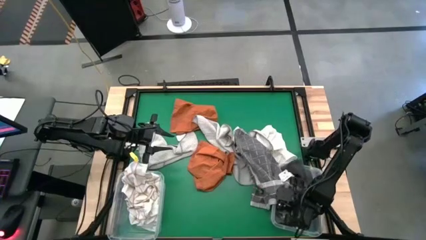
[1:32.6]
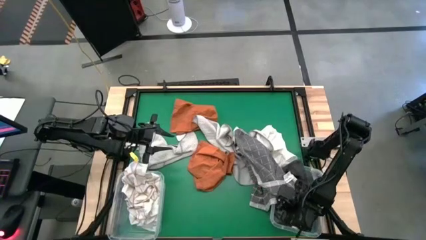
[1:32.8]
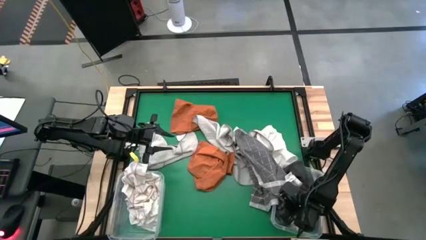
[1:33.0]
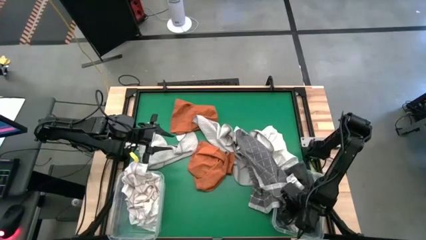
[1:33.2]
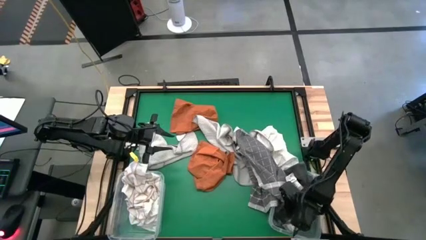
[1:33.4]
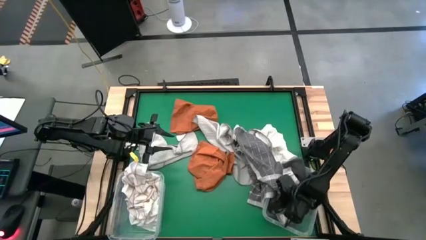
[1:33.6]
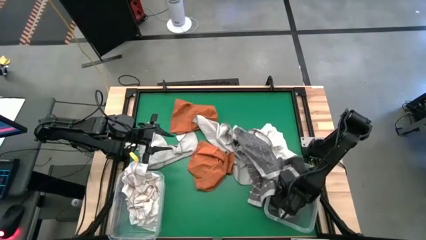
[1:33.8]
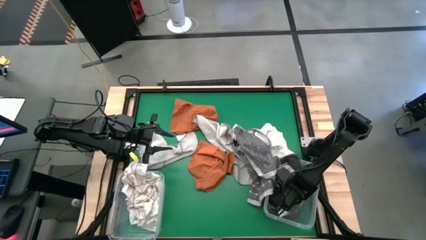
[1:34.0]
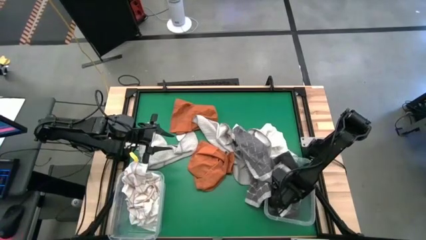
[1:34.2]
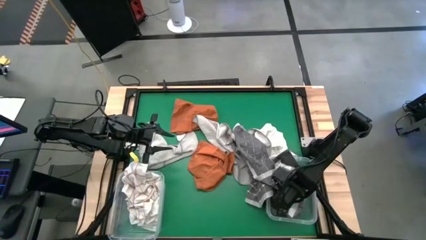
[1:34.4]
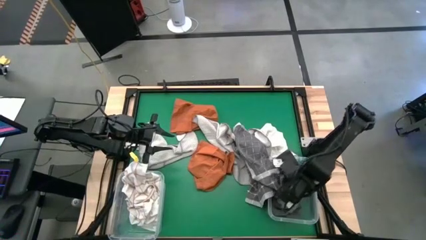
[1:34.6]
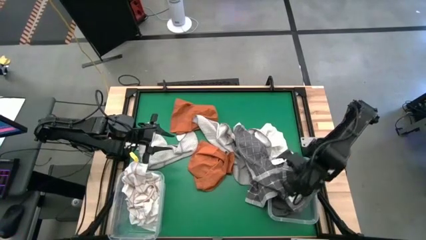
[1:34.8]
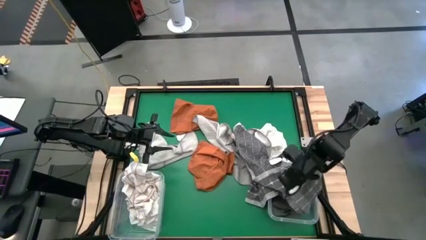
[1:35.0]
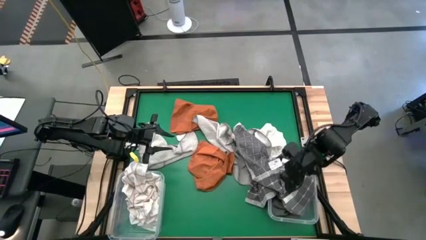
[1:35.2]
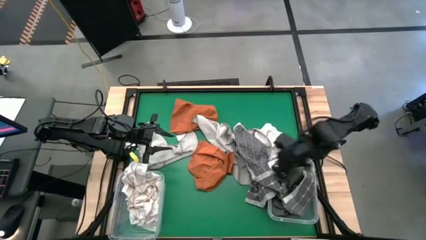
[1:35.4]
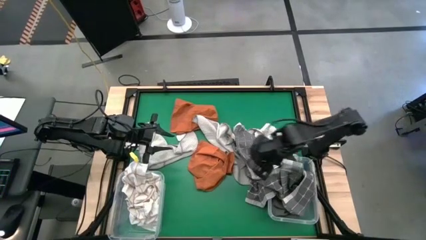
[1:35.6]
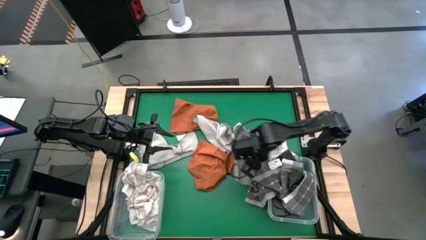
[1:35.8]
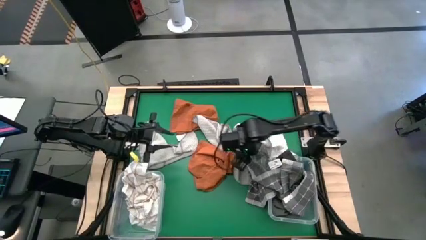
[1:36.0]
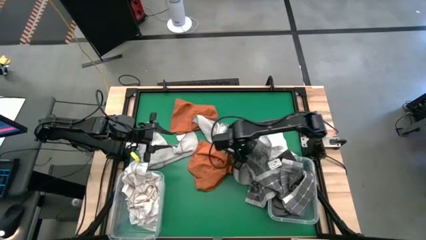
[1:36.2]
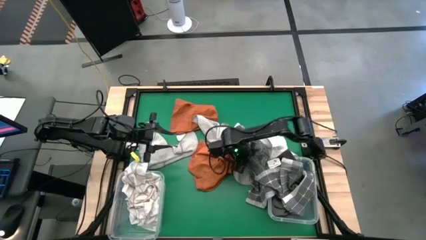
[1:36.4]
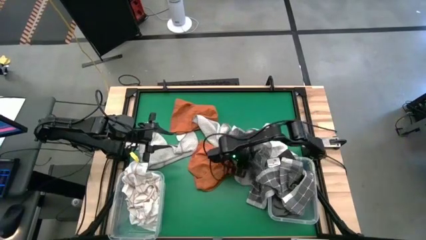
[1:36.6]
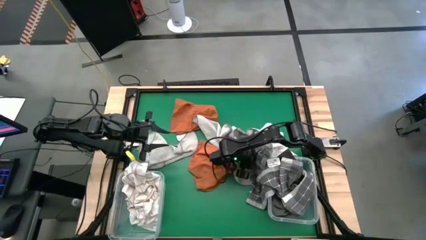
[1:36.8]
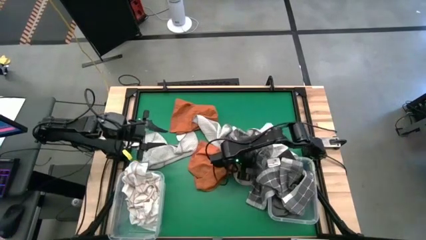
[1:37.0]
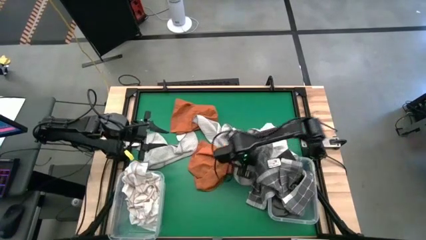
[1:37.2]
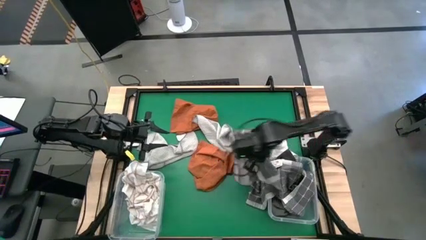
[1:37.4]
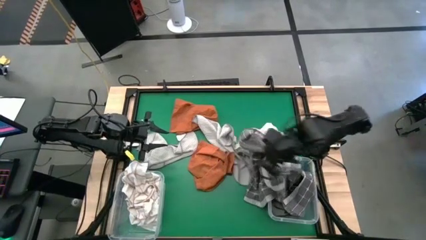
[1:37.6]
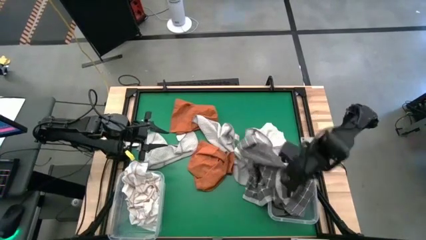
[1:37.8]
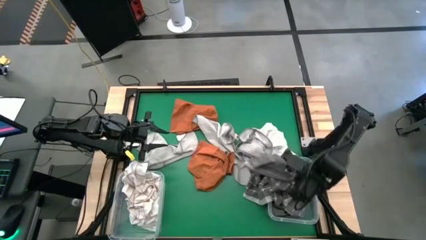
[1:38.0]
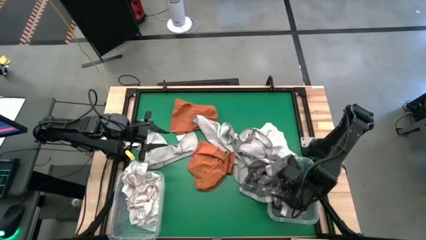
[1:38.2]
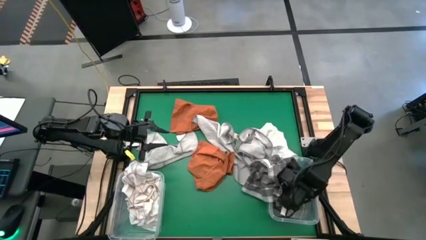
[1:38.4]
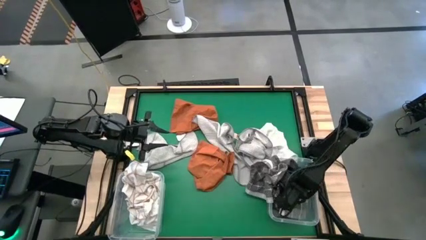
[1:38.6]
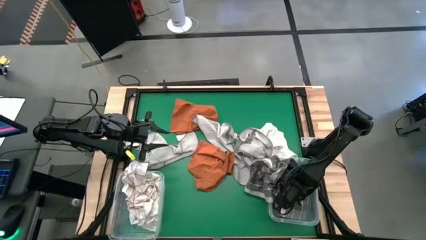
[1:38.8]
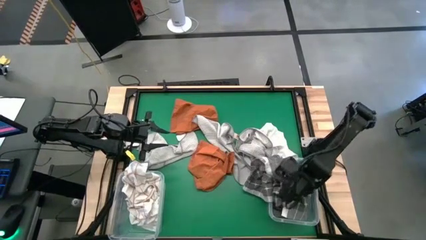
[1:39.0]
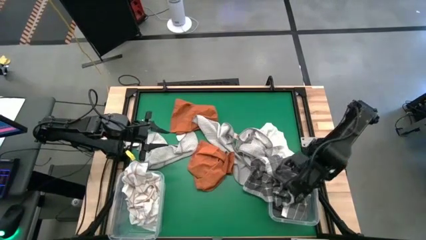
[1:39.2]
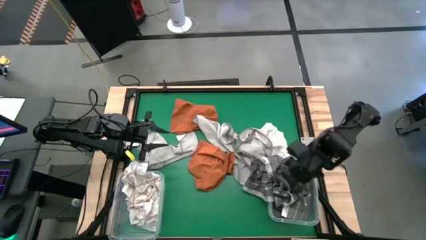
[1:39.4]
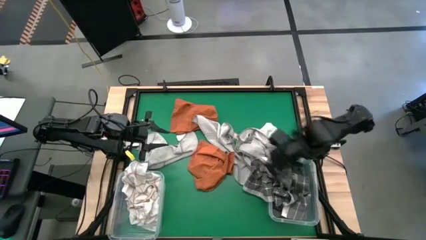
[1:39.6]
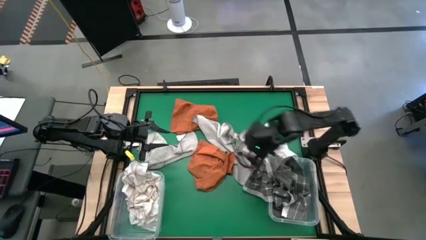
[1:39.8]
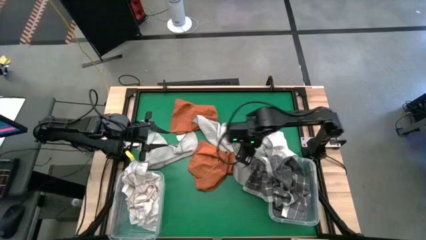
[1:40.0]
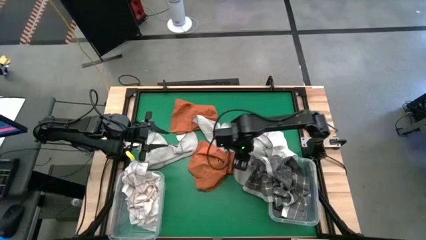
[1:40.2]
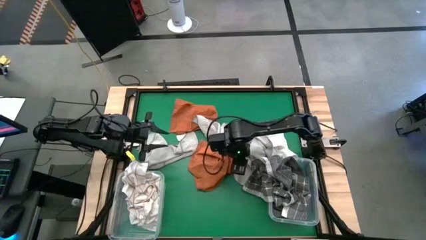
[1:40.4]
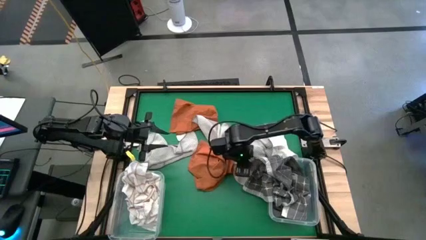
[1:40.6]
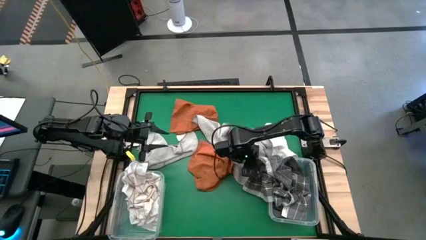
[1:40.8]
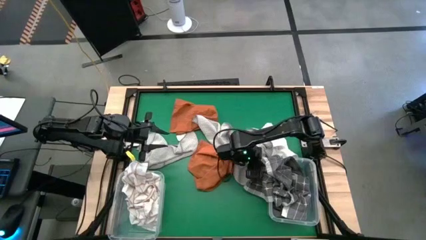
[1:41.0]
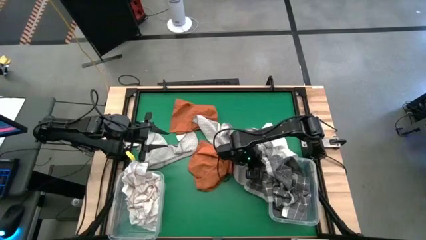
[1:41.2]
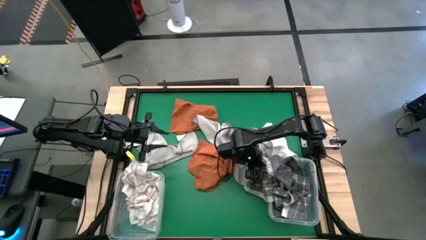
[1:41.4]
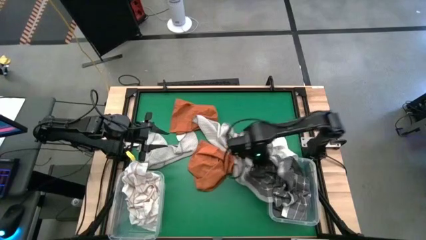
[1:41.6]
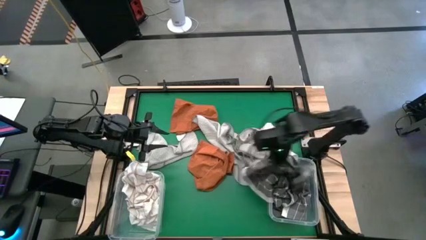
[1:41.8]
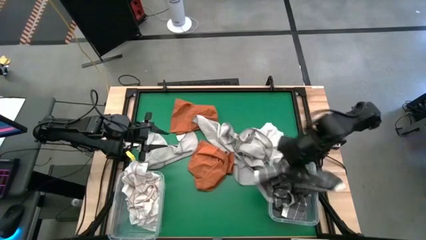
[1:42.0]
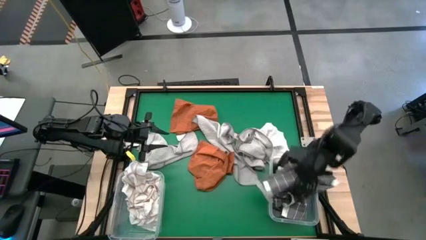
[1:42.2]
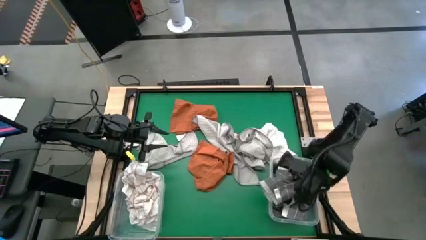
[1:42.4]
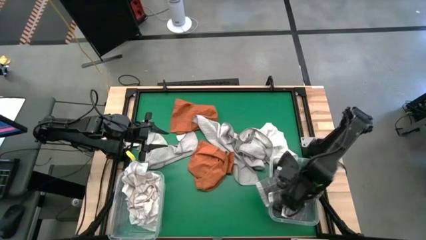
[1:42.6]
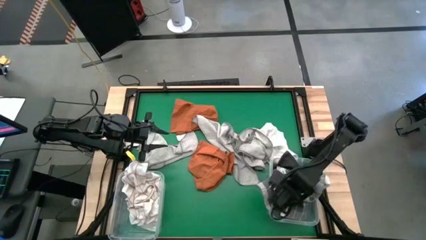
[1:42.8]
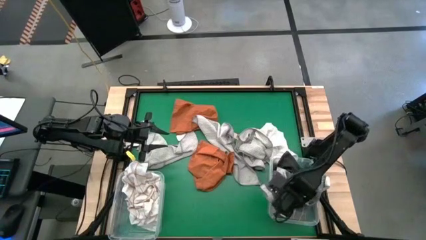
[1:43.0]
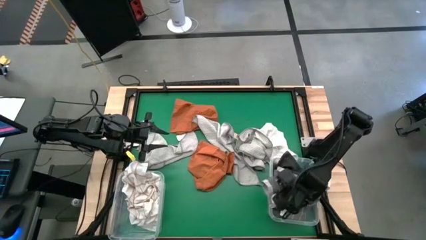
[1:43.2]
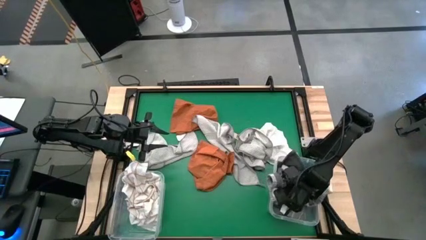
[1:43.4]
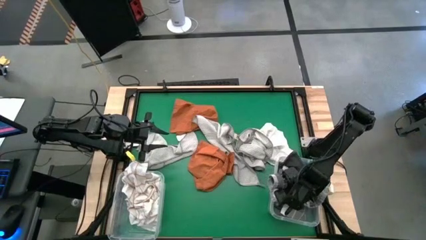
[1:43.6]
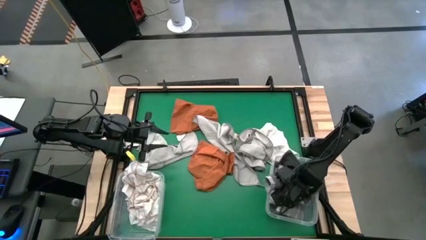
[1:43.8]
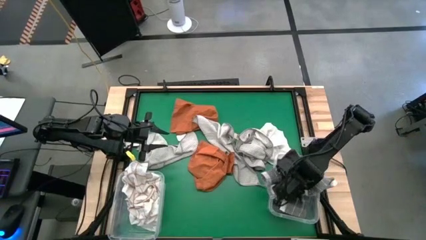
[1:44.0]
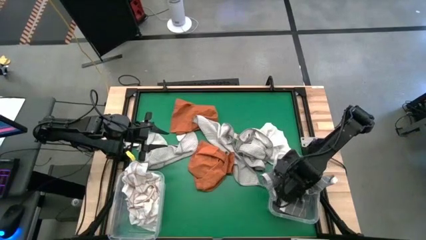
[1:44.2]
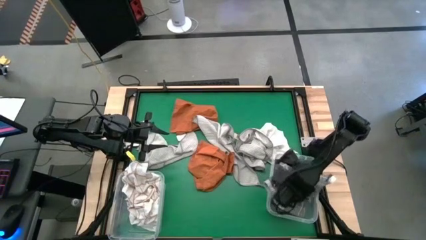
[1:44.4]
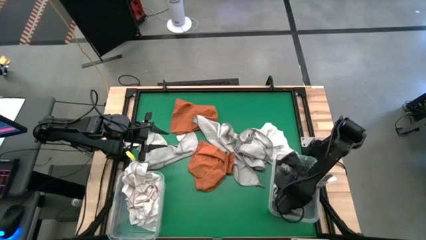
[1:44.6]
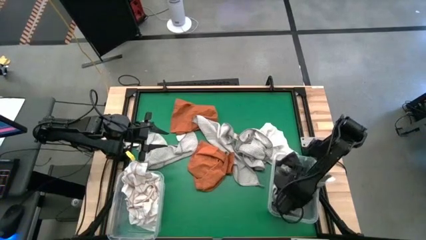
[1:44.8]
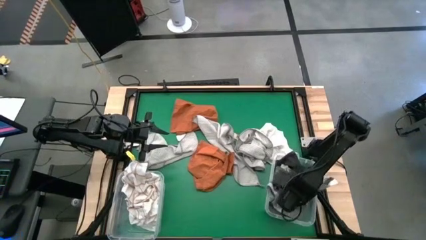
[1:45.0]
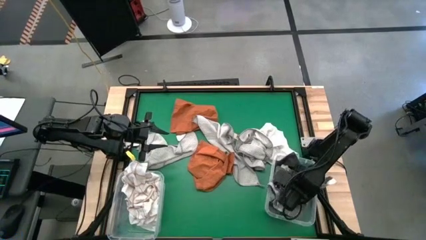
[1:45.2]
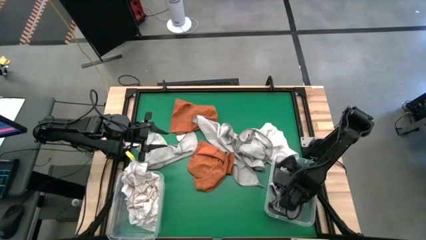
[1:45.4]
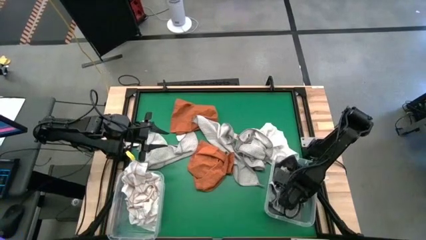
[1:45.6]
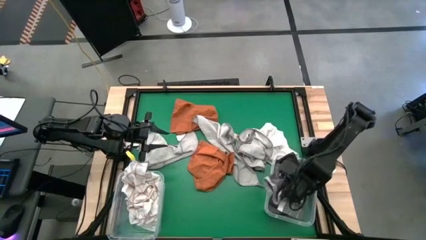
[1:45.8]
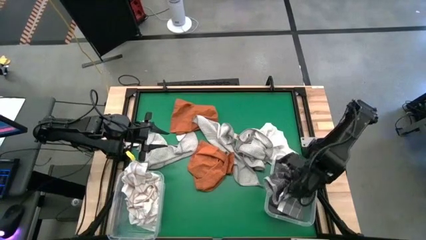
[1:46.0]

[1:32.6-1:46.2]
Task: Sort towels by color in basket
Put the gray squared towel into the right transparent bin

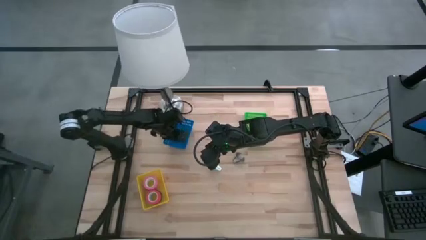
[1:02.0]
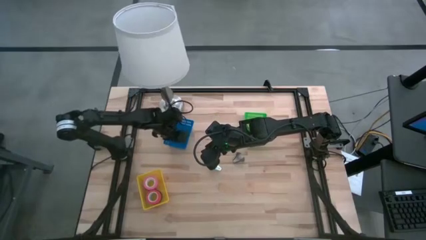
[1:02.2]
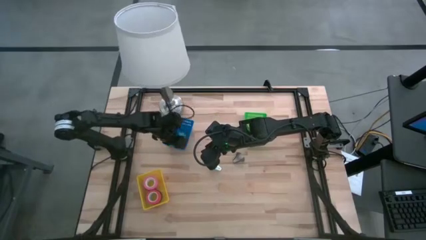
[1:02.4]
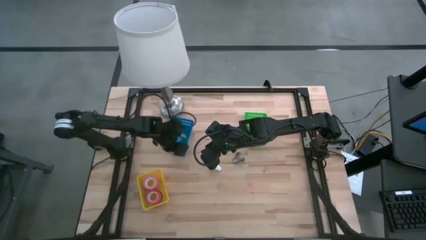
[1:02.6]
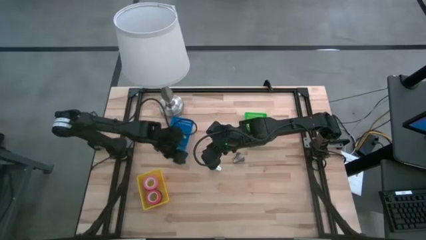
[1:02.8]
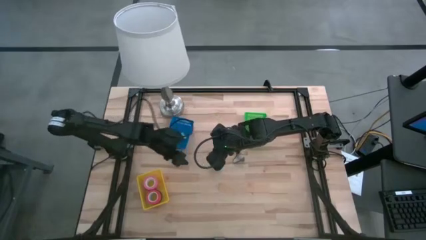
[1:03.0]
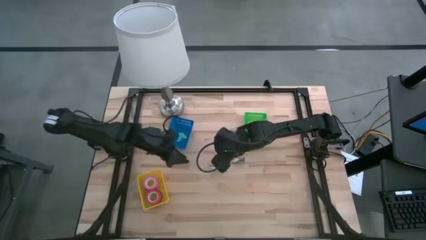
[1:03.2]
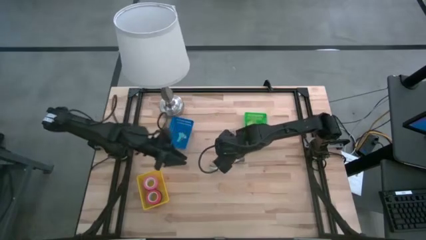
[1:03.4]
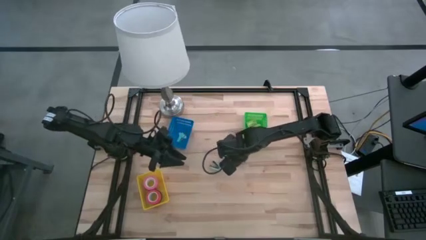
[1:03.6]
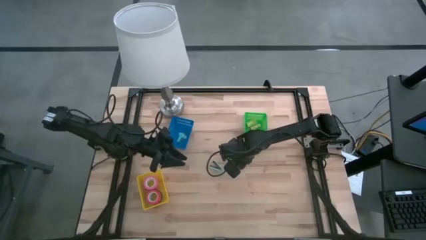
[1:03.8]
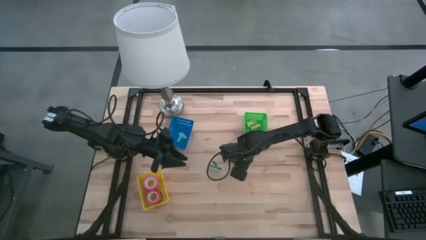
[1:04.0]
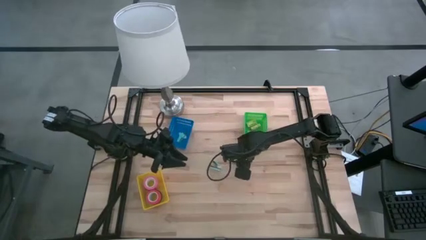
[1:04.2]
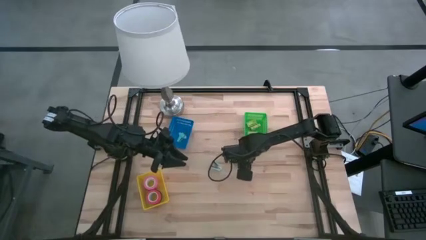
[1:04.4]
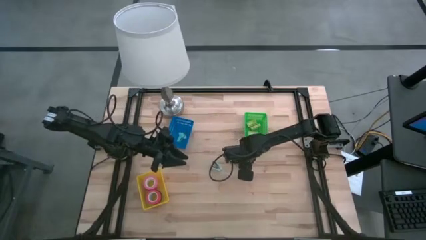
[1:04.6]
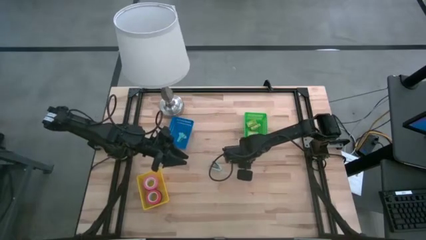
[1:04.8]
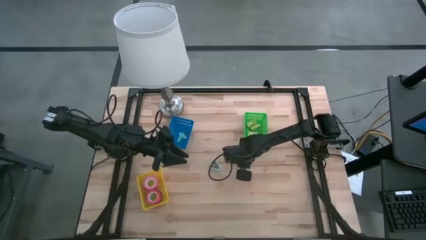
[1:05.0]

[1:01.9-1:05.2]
Task: Pick and place Stapler, Stapler remover, tape
Put the black staple remover into the blue bin
